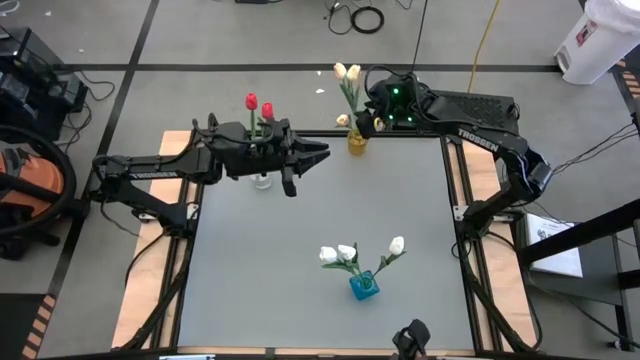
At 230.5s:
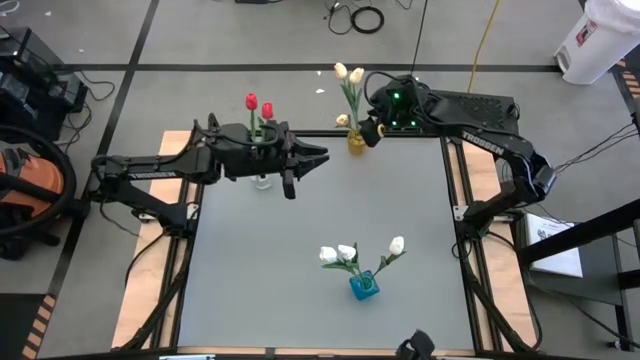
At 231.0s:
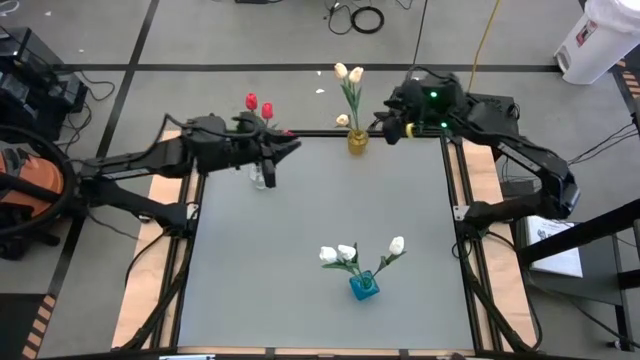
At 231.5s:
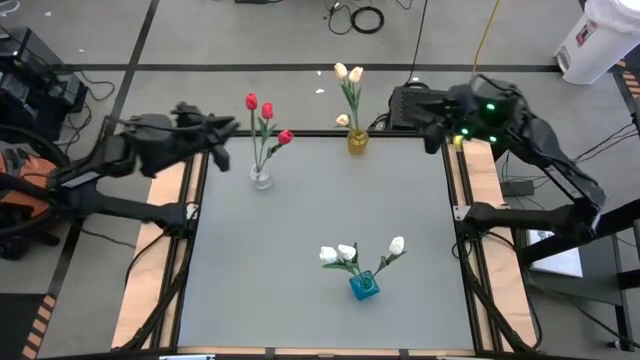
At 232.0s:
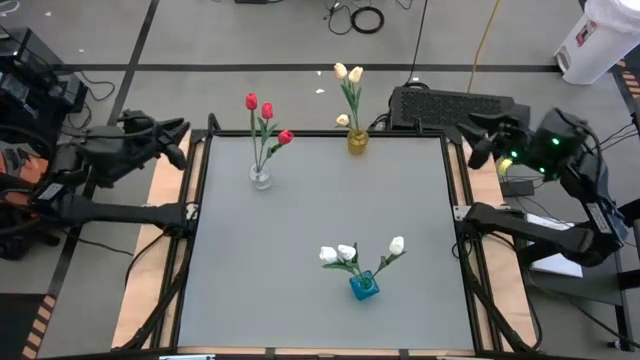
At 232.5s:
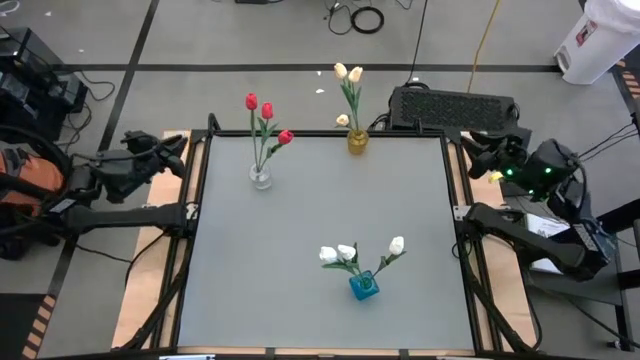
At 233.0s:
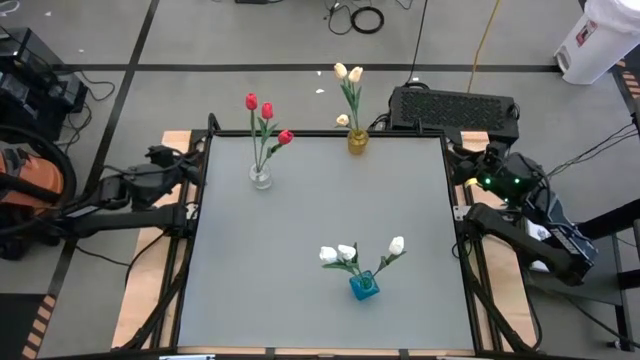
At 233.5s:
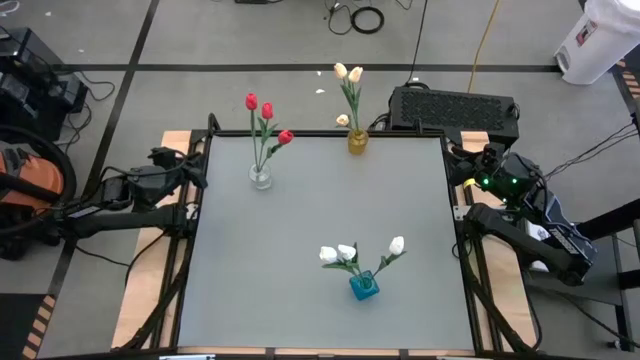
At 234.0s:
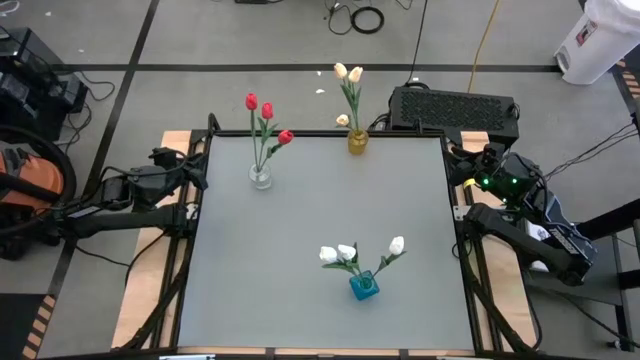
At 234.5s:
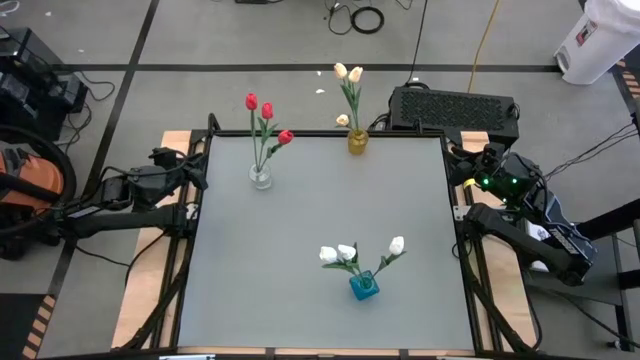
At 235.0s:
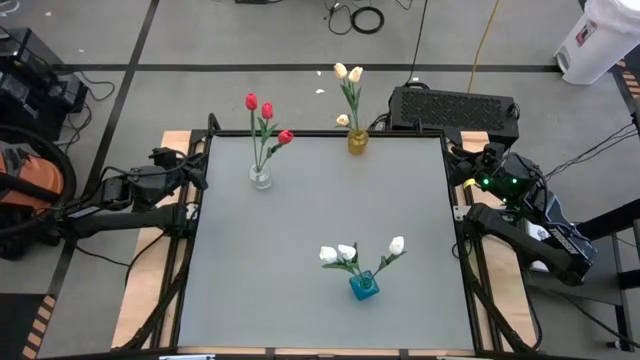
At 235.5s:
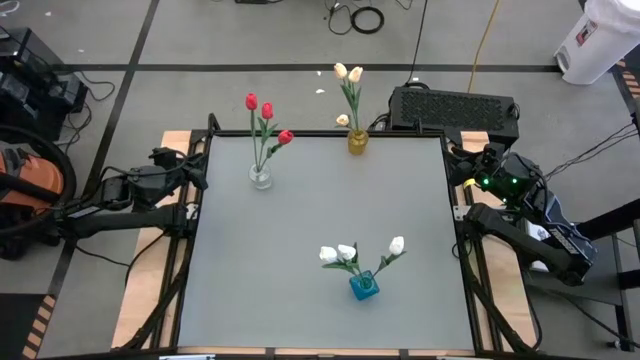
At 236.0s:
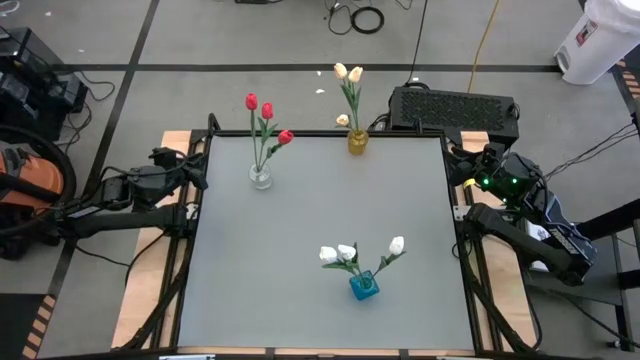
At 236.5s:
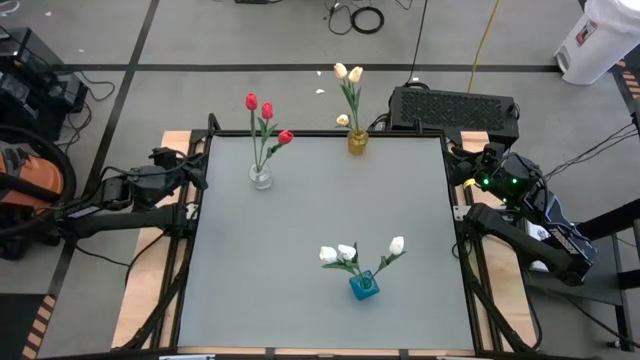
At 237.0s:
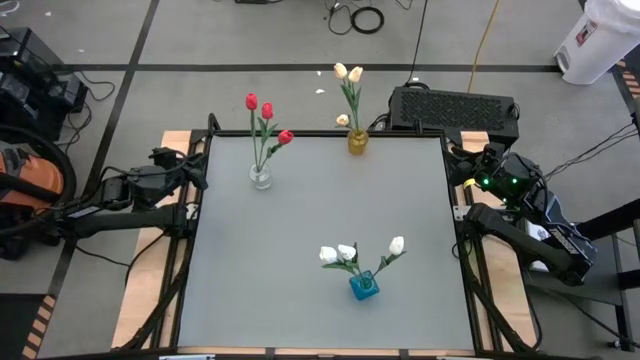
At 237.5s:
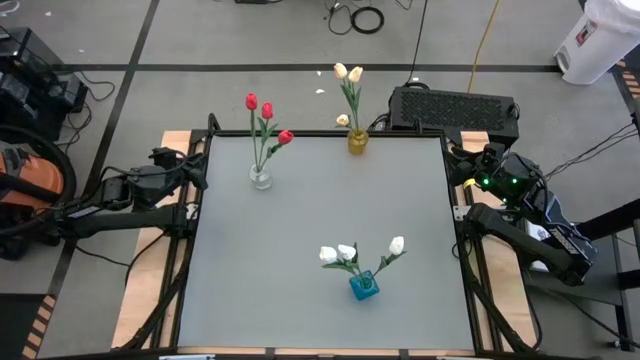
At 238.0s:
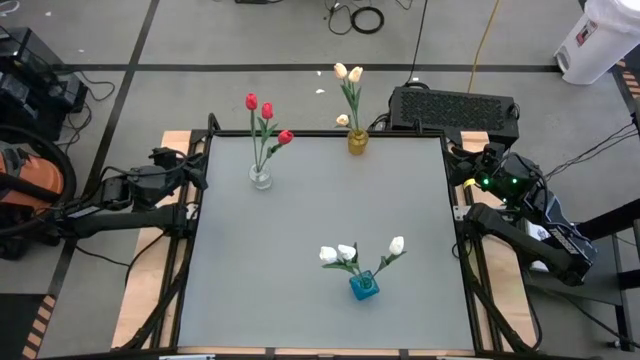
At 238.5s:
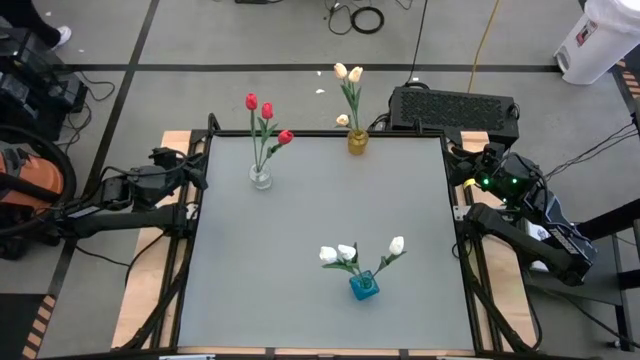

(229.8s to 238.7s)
Task: Sort flowers into vase by color
Return to Home Position

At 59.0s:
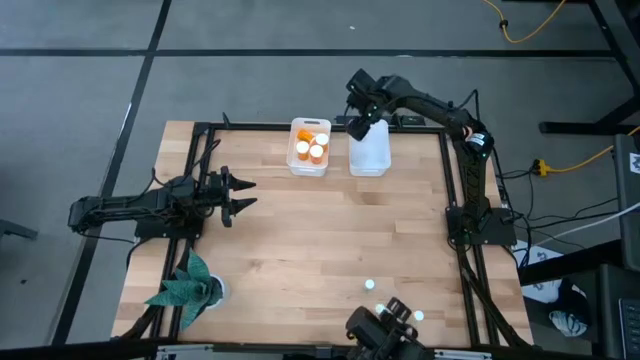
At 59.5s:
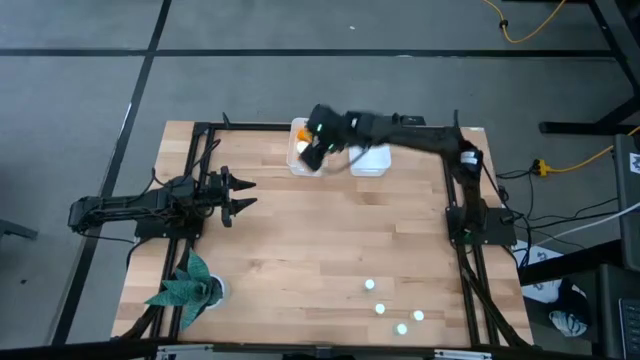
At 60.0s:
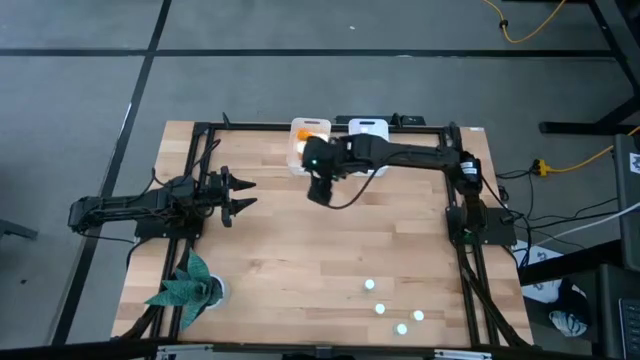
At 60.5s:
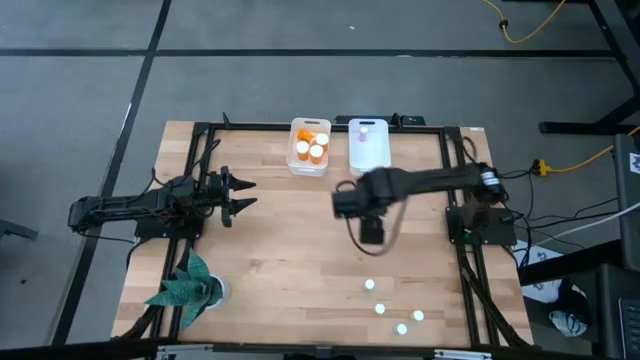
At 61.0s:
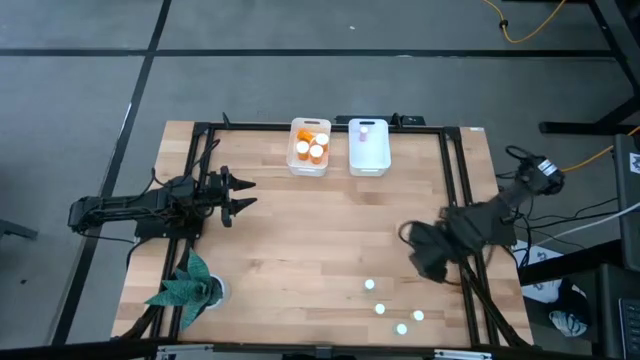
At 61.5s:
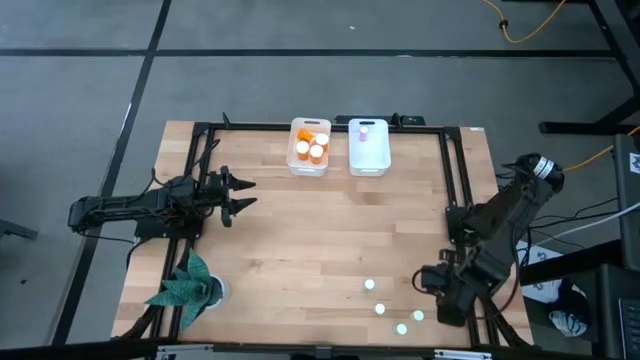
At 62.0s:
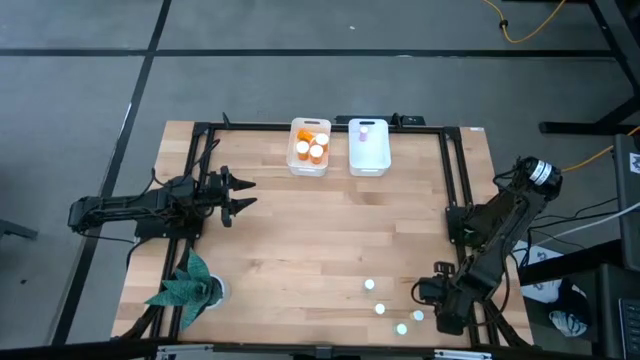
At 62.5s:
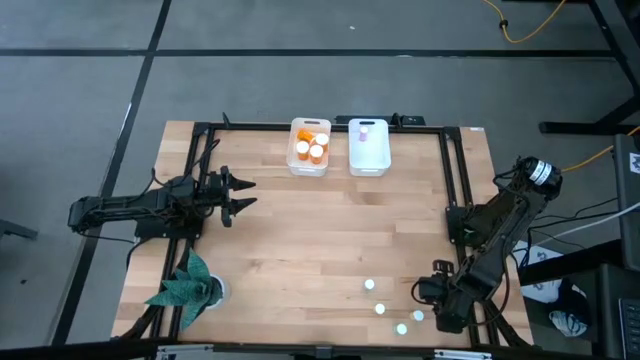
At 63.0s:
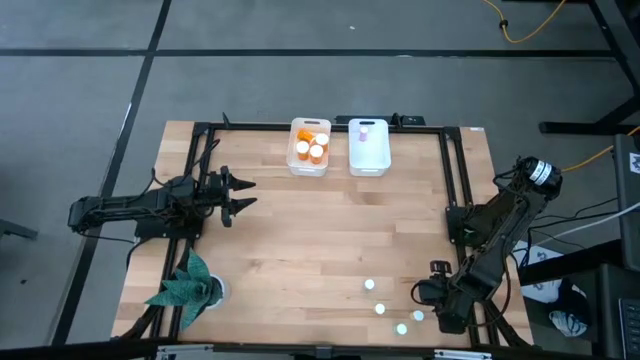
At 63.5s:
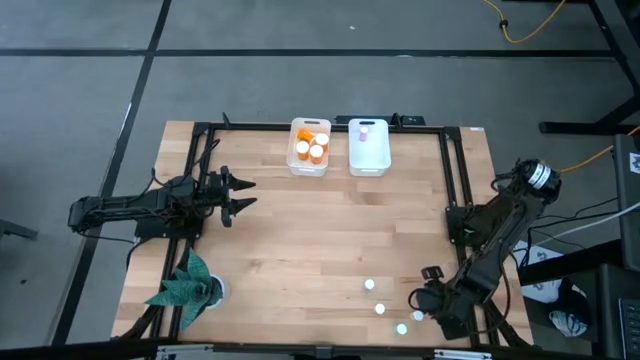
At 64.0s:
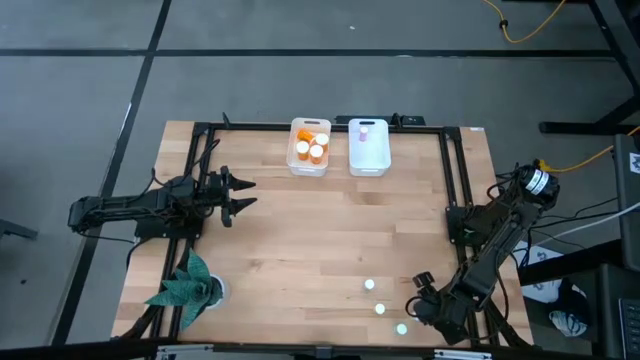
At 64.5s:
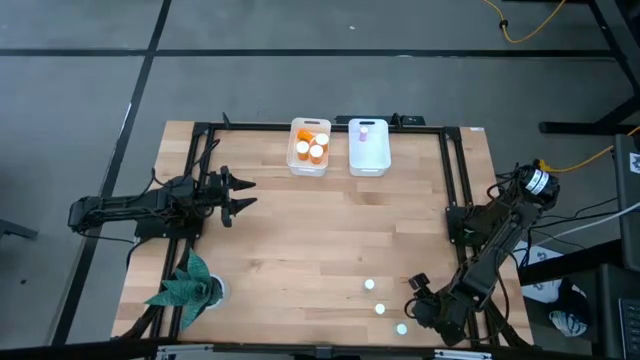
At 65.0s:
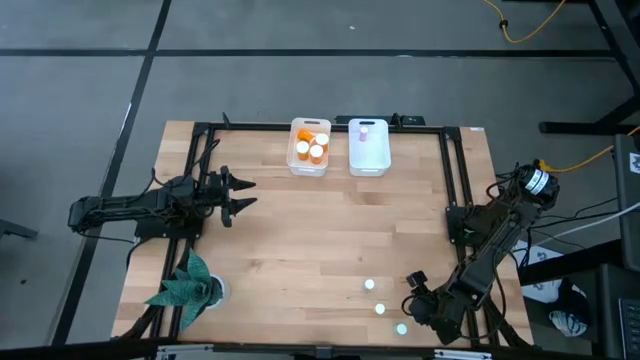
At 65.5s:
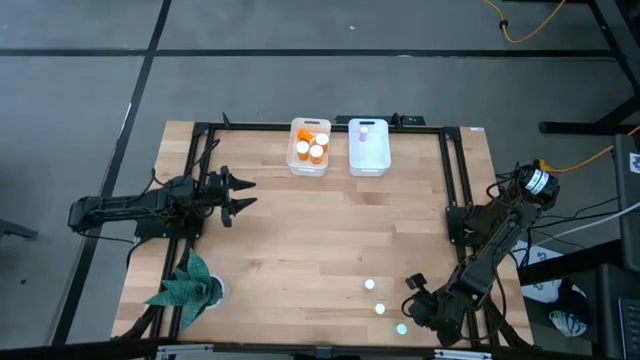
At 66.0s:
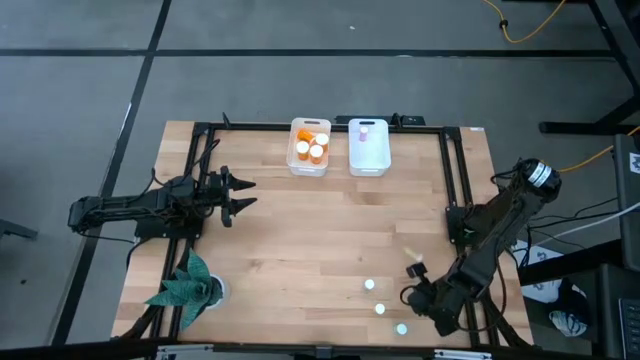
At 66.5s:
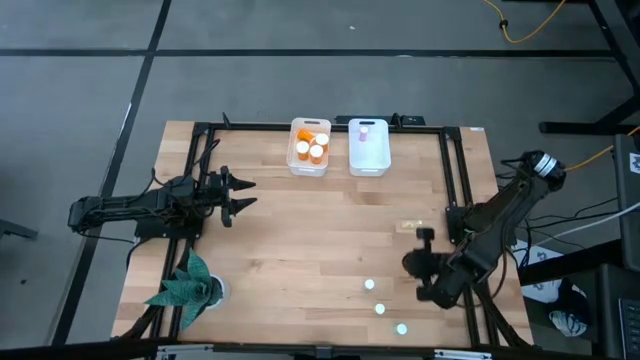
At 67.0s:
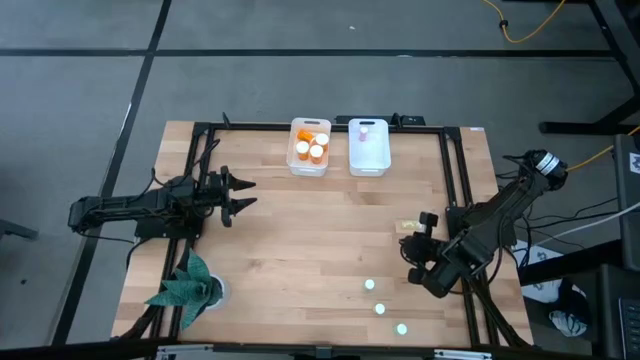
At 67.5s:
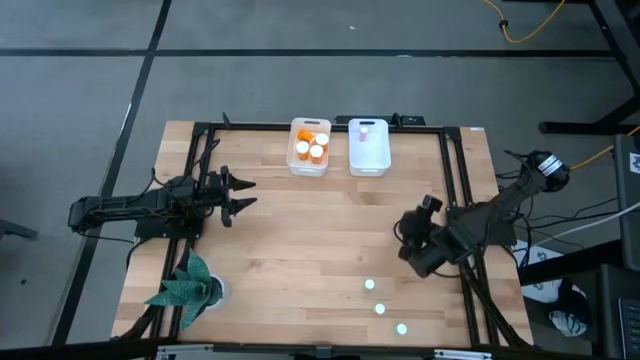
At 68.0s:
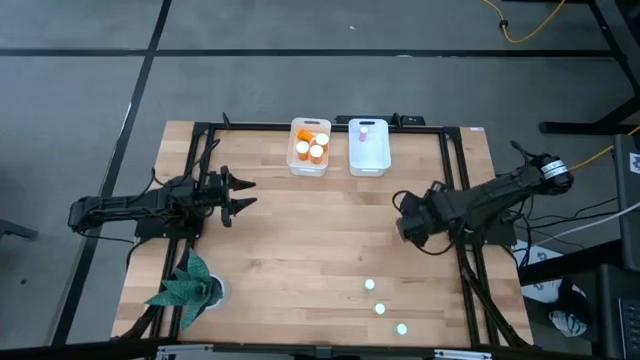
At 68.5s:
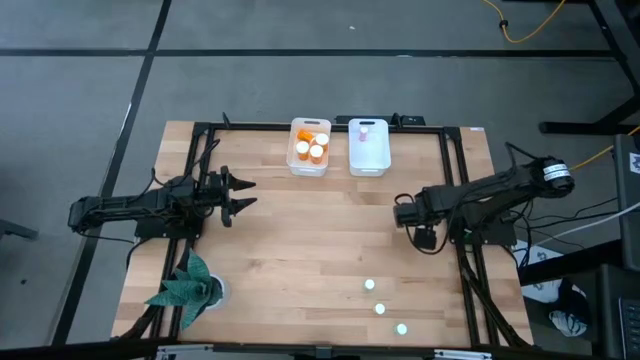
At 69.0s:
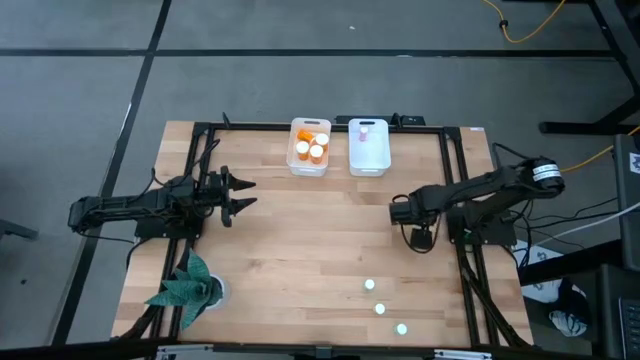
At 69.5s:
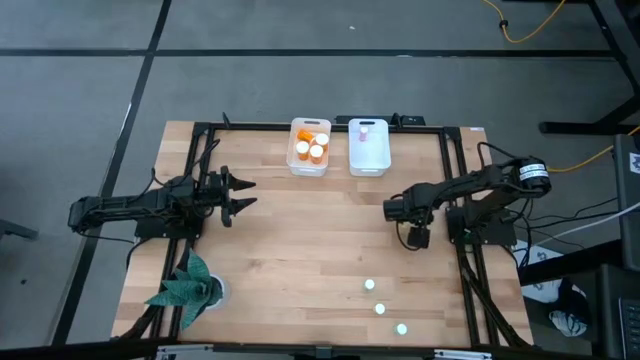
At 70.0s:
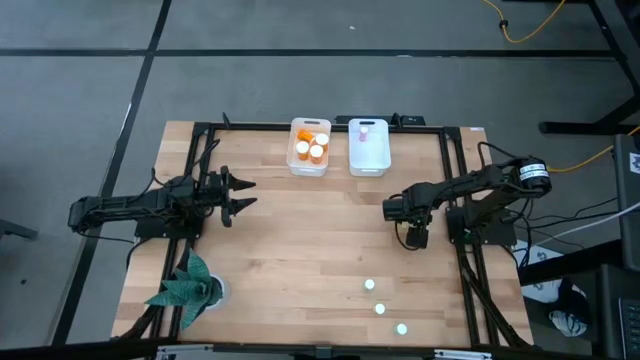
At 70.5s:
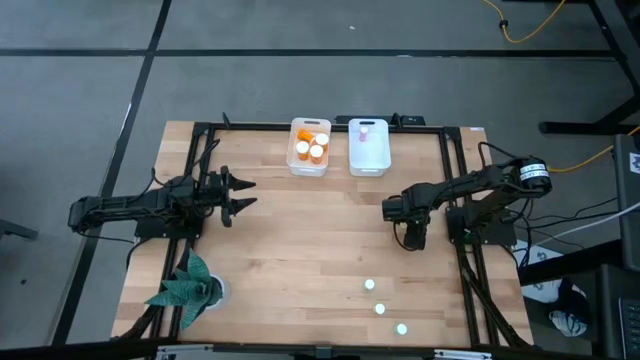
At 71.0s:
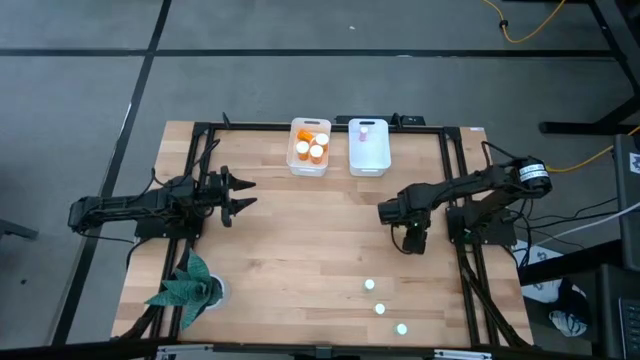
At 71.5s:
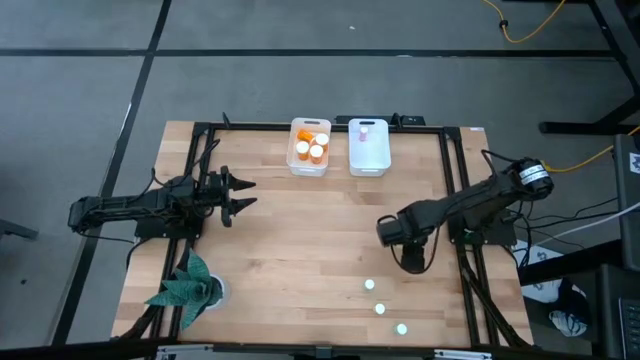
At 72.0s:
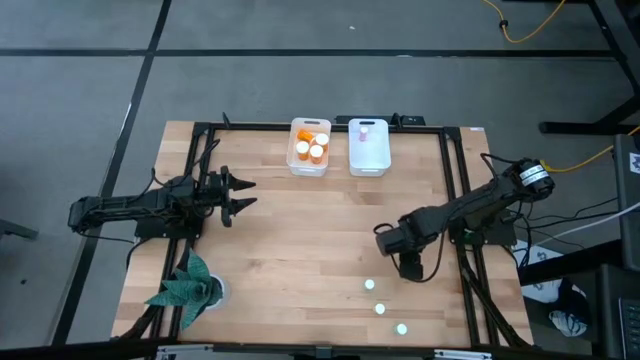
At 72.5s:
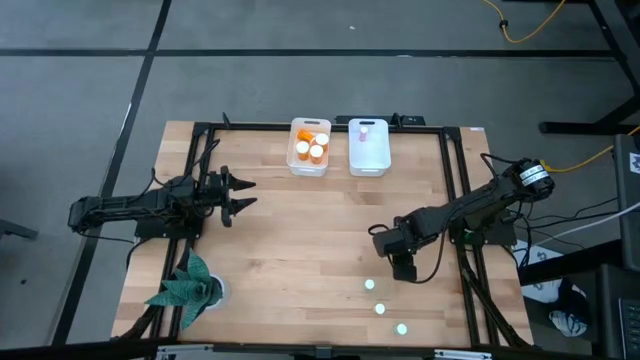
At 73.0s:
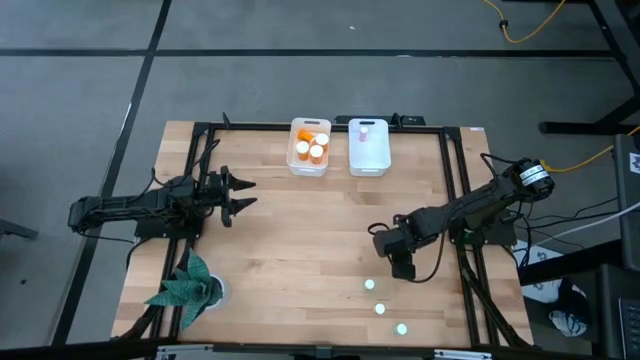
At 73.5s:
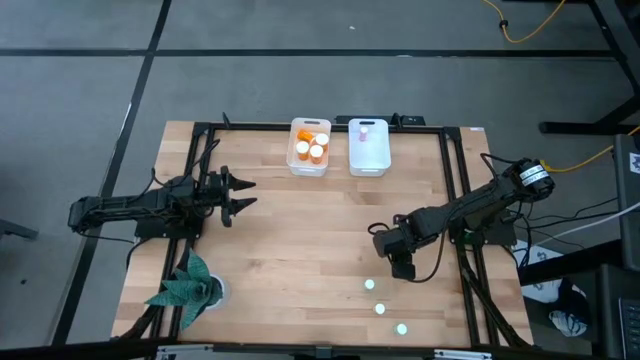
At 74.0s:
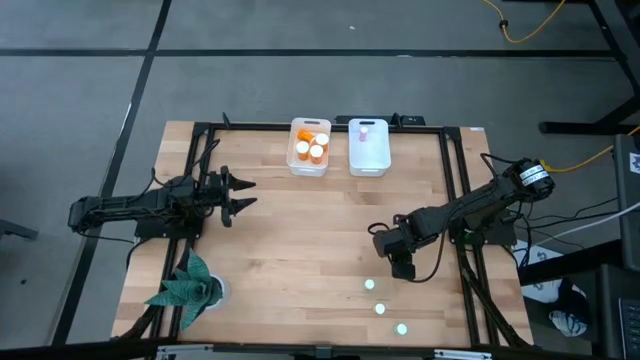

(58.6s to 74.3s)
Task: Pick and place medicine bottles into bin by pill shape (circle, oval)
Put the yellow tablet bottle into the right white bin
